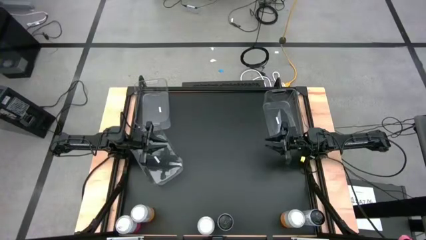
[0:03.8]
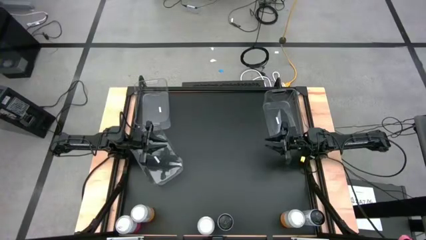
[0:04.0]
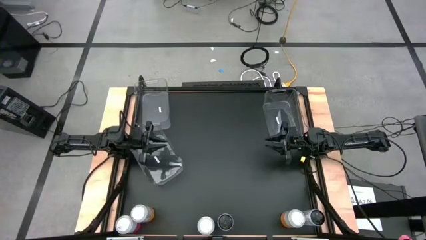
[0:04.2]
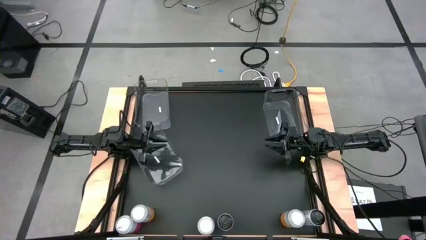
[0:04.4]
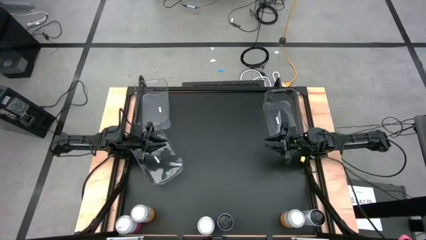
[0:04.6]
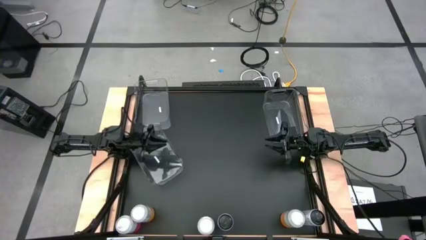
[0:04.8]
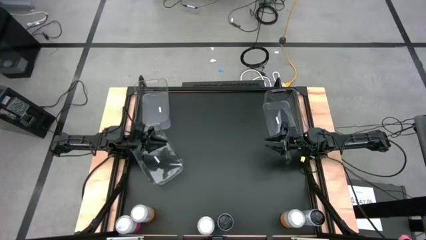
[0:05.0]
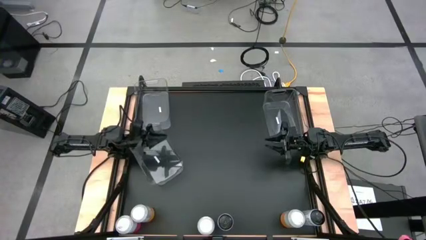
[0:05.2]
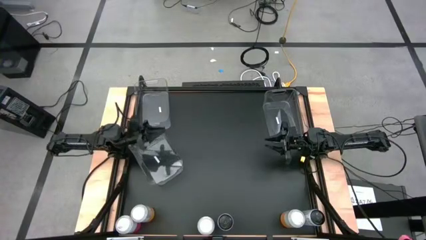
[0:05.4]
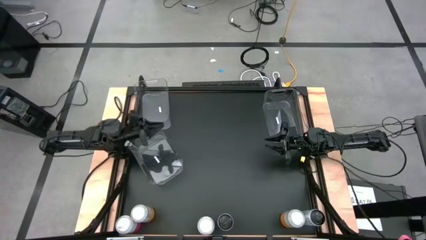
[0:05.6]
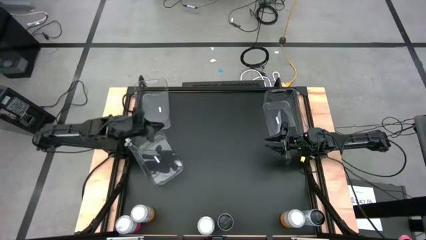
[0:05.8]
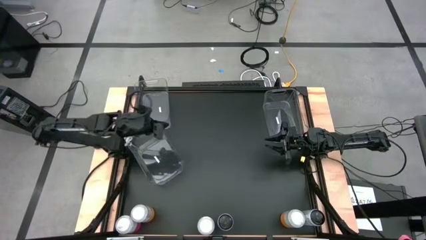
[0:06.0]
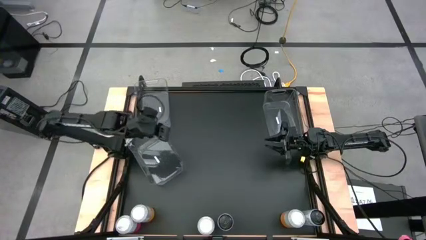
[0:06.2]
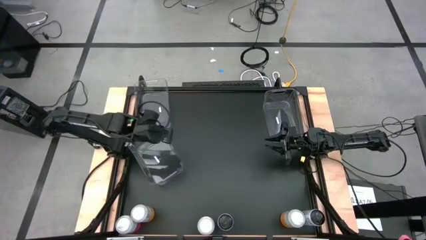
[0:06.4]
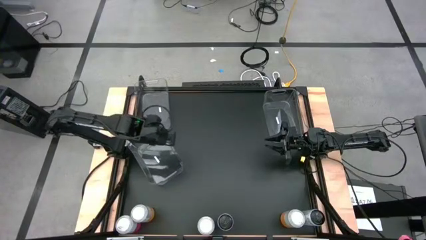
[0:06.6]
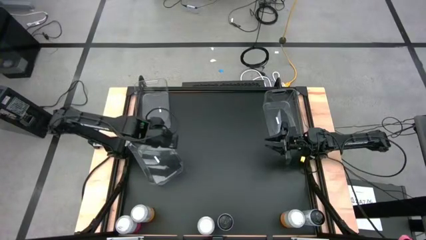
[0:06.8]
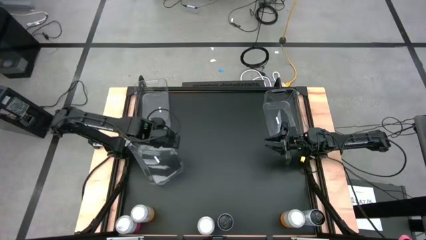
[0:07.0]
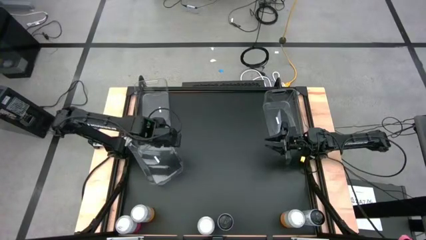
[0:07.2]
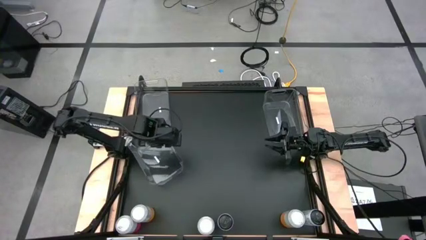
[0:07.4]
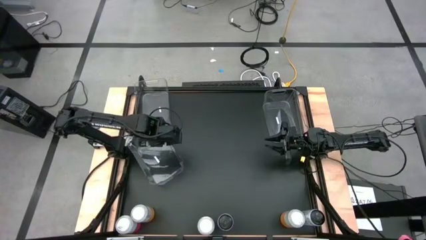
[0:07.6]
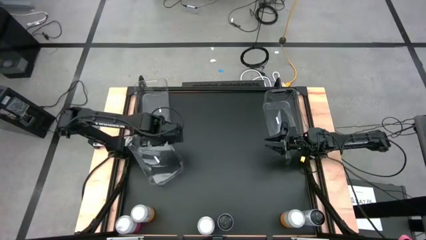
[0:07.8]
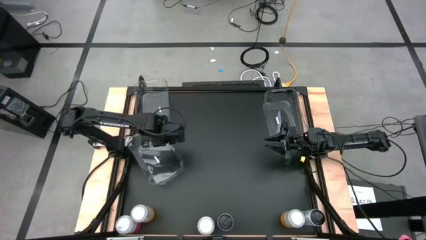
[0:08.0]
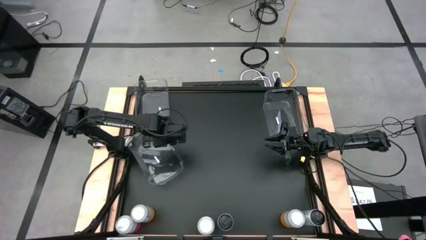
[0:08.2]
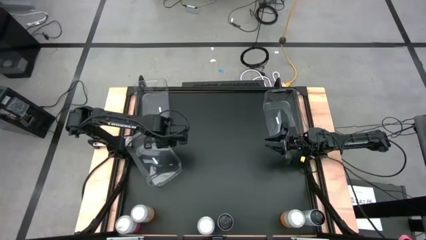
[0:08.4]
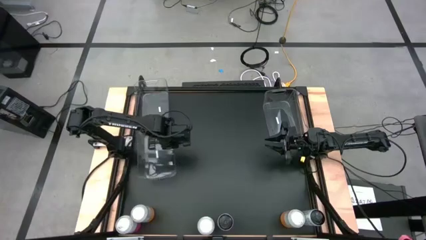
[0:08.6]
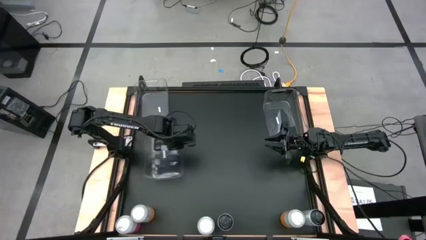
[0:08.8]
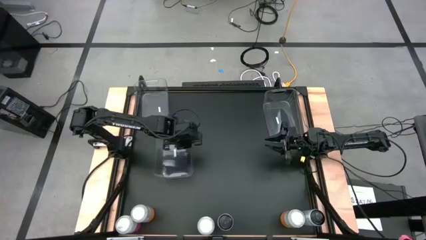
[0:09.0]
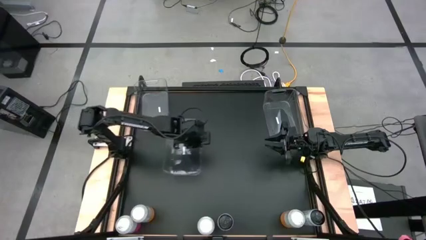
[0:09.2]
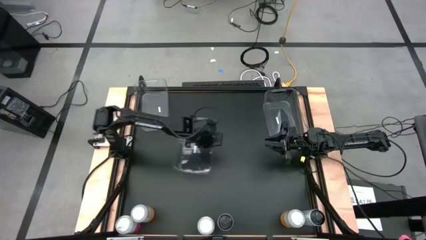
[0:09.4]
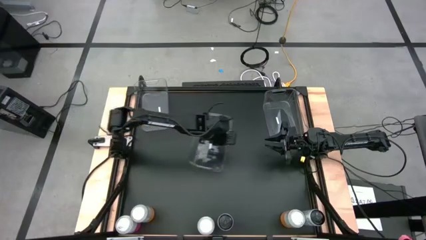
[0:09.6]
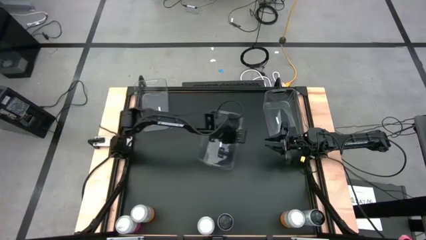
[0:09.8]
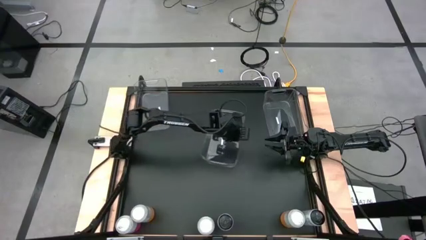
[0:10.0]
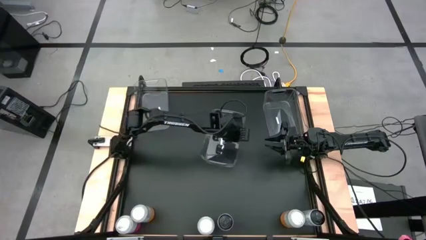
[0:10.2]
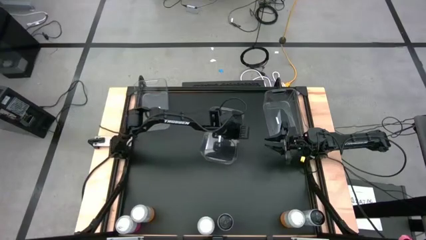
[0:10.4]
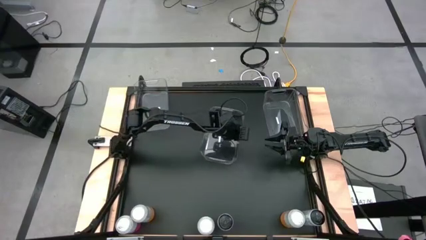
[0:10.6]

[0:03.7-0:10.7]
Task: Sort soda cans
Move the bottom left transparent bin to the center of the table

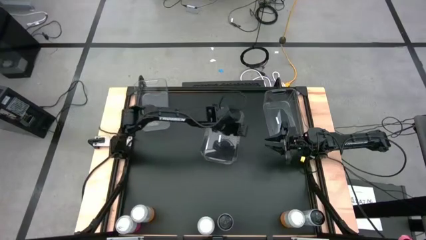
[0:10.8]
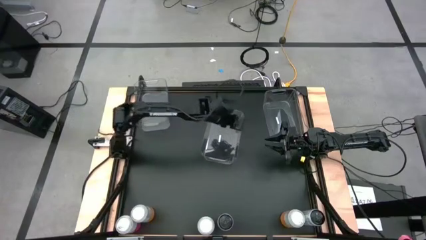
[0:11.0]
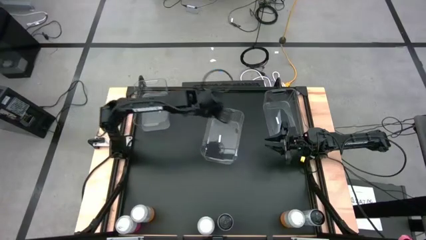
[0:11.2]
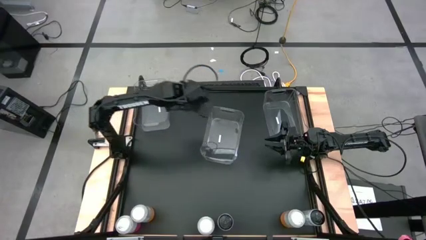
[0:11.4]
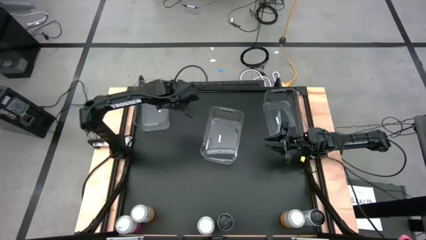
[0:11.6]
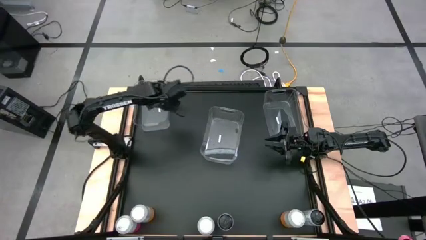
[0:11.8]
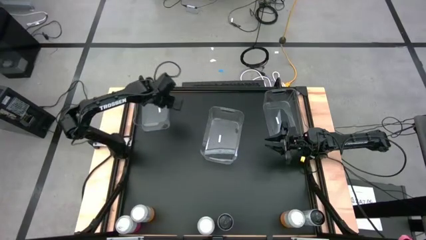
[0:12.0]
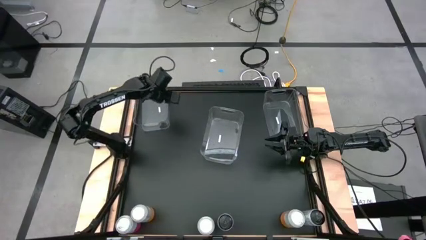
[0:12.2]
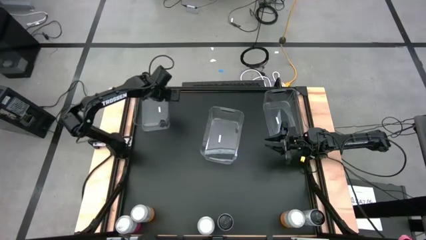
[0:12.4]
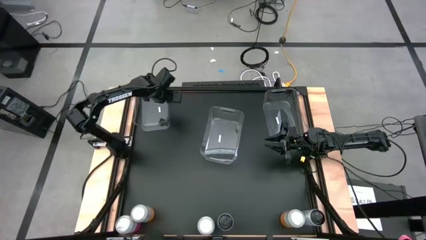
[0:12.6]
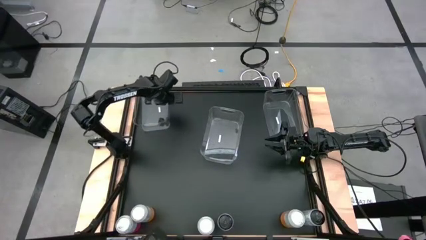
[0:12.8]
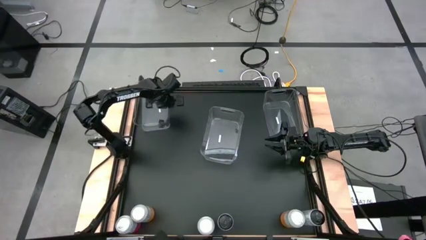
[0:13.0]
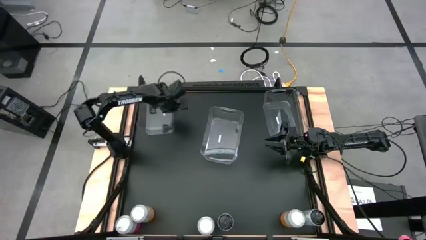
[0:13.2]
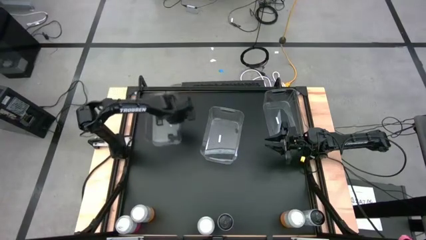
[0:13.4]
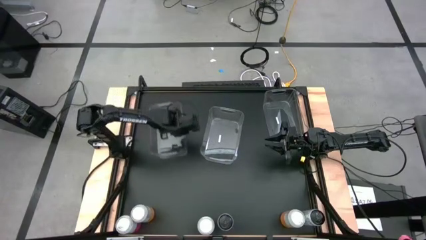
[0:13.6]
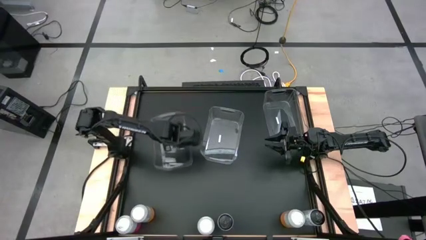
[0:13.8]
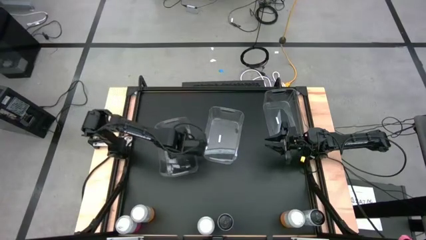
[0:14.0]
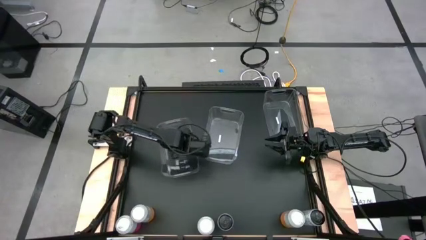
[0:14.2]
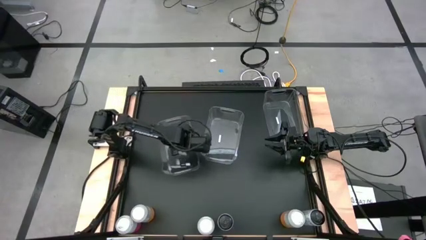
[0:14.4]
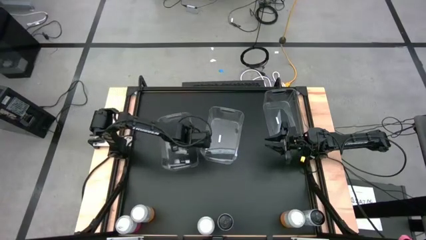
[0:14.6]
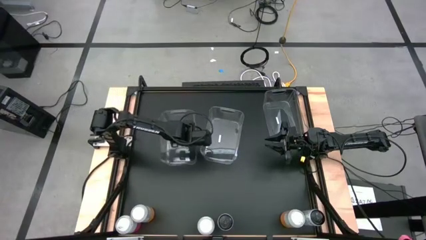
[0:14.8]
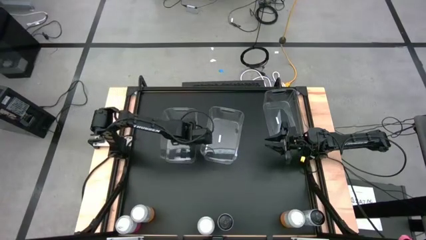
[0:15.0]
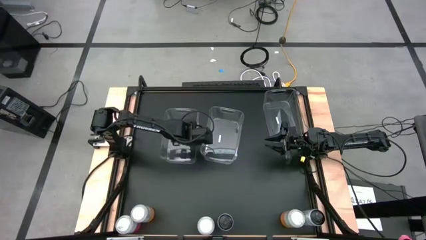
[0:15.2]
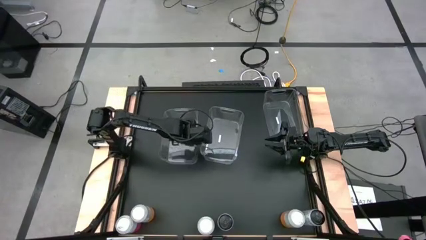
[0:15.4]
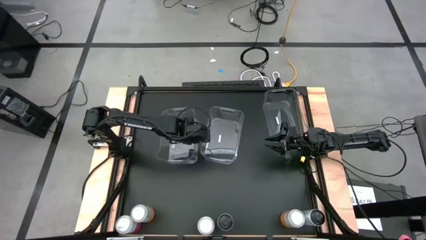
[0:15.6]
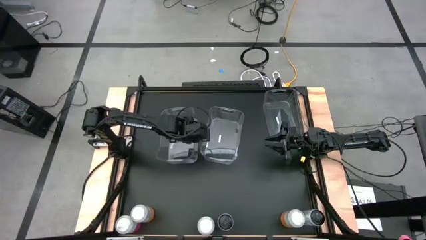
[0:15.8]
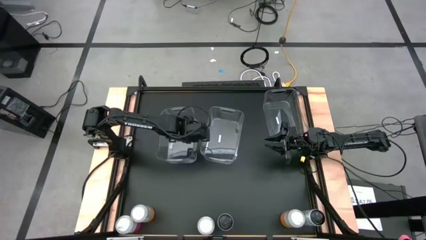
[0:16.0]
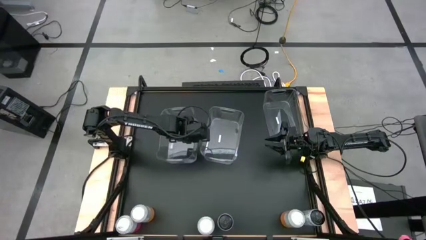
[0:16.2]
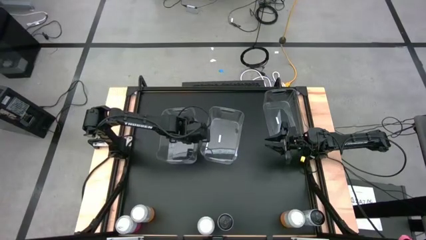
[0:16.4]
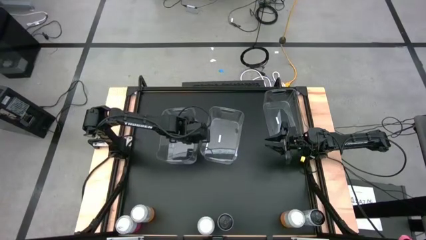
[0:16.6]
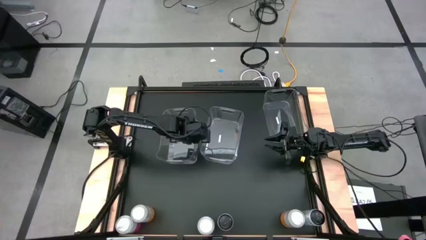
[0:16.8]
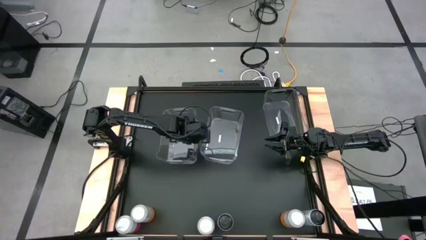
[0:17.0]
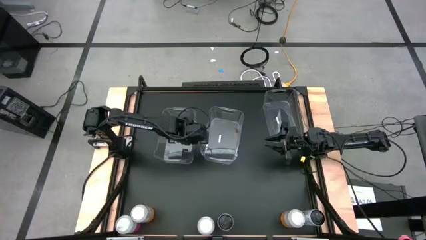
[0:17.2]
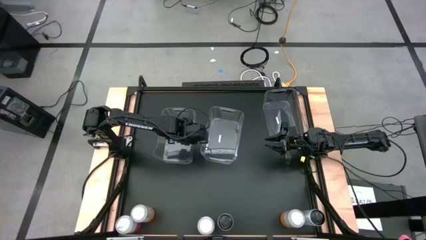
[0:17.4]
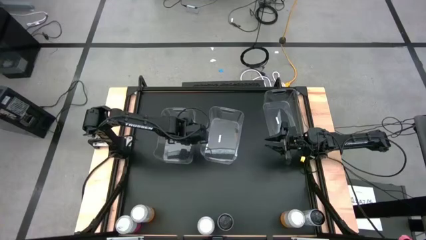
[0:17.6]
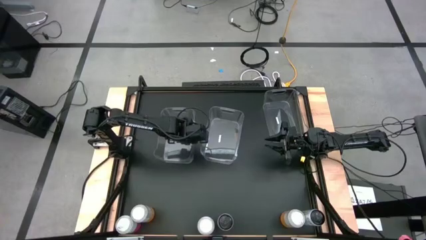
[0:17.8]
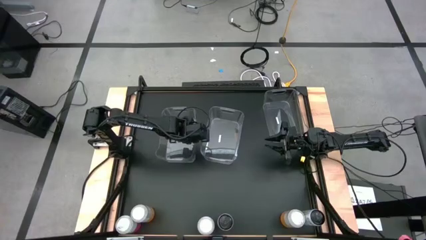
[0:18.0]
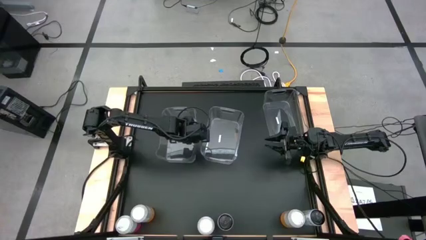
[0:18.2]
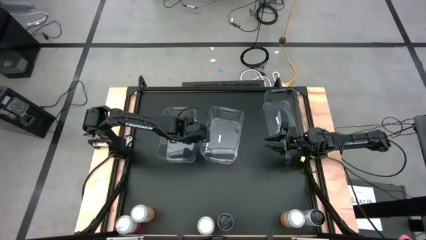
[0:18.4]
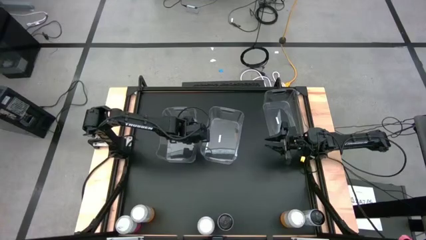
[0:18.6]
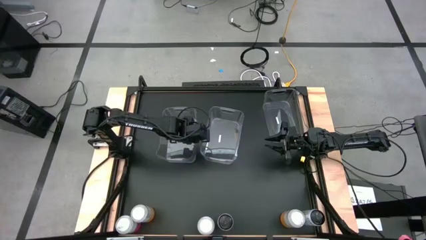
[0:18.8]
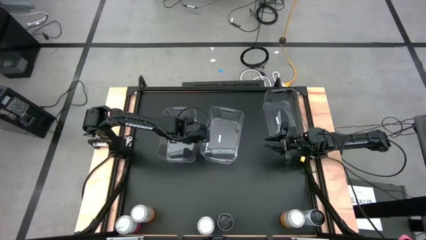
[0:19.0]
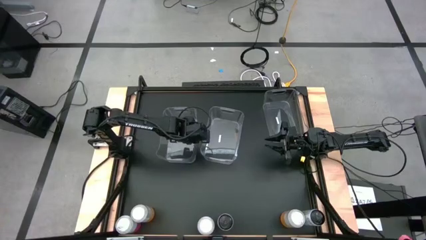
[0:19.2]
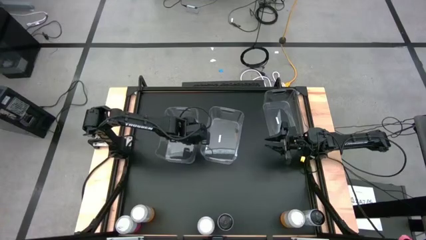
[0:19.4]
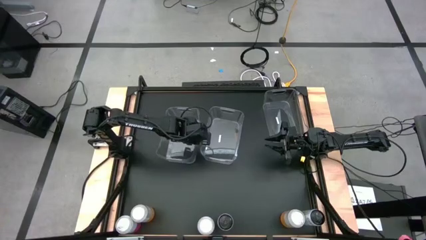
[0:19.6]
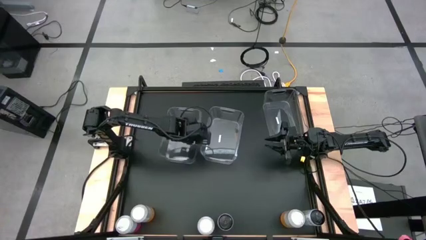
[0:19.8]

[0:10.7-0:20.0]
Move the left transparent bin to the center of the table
